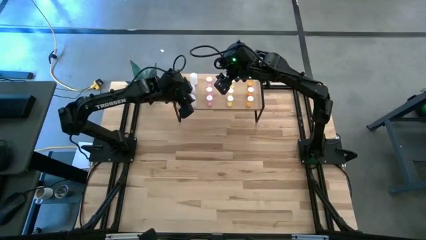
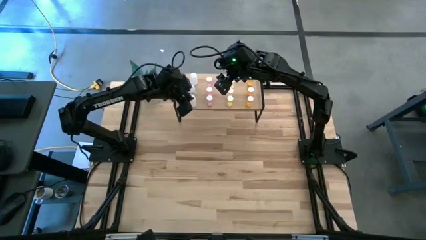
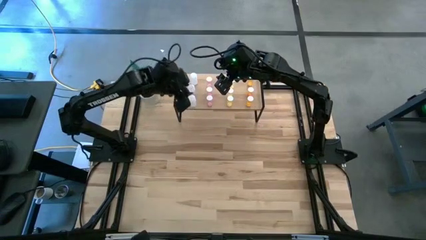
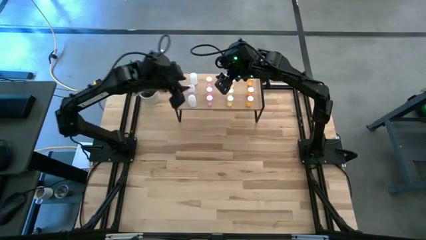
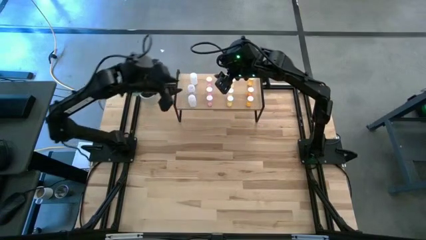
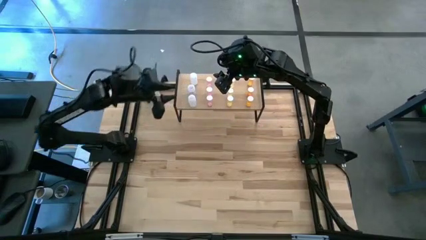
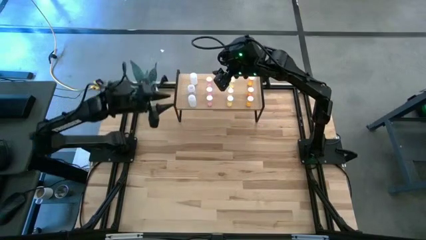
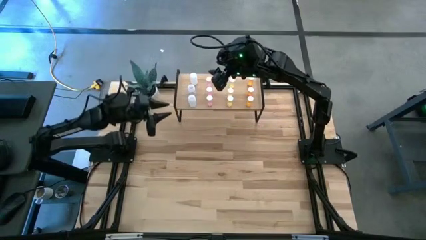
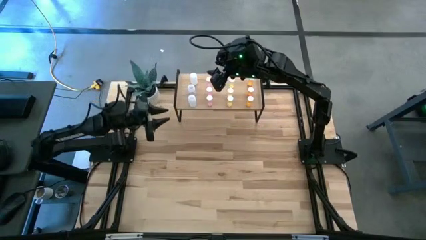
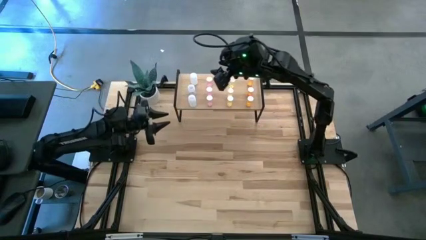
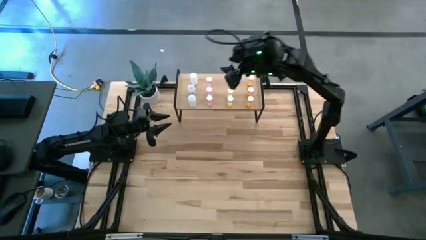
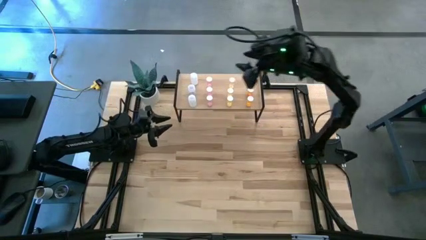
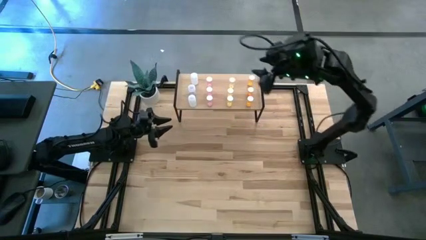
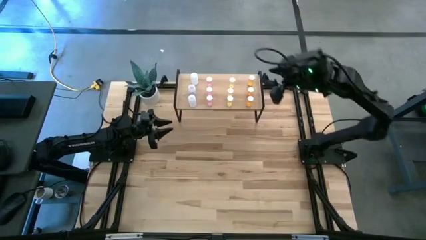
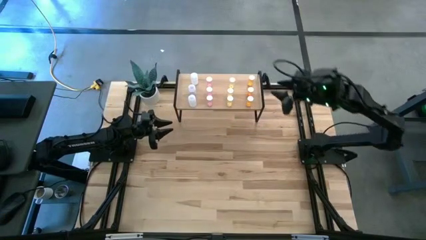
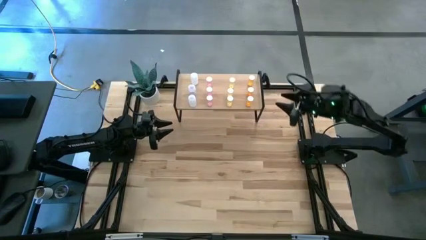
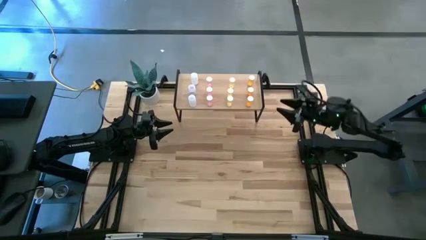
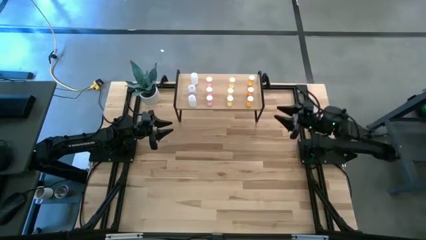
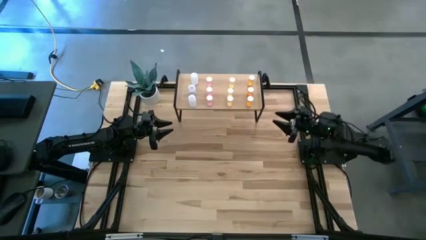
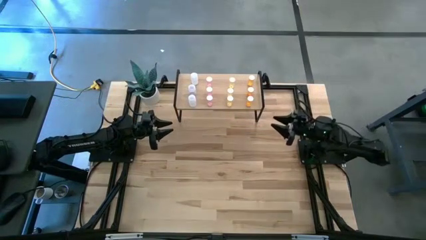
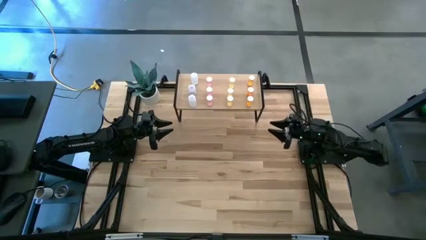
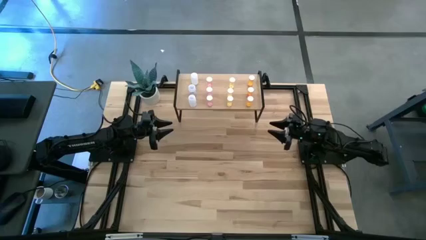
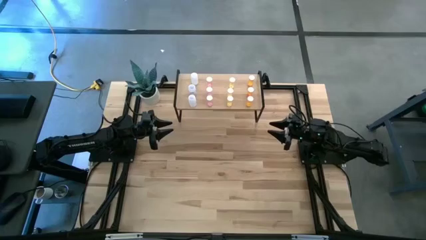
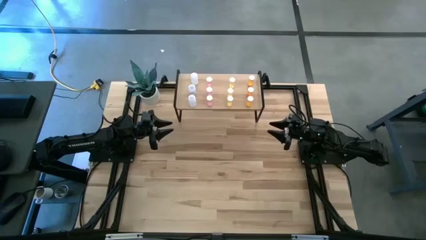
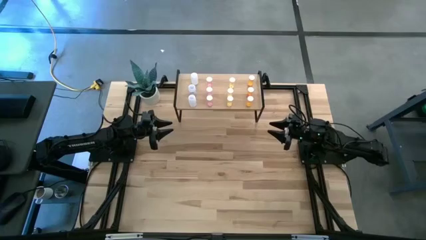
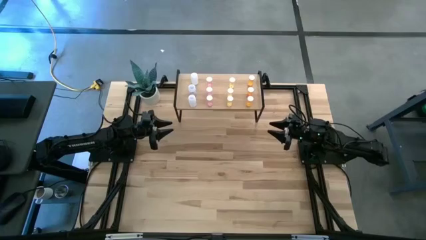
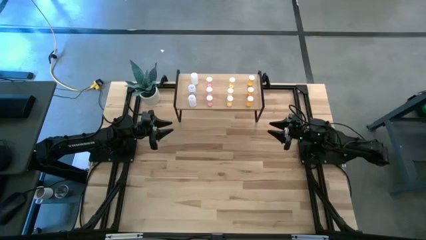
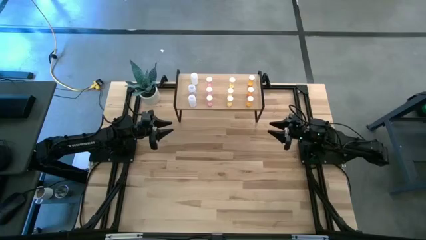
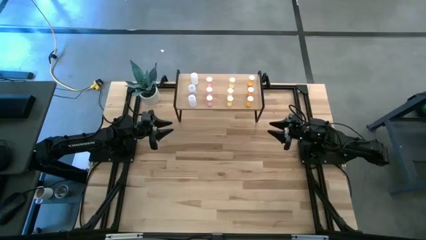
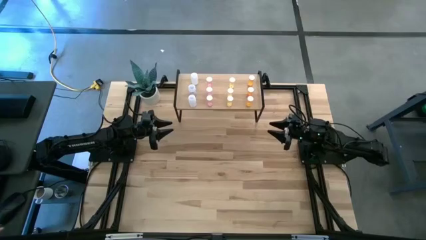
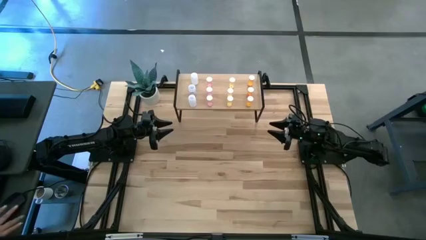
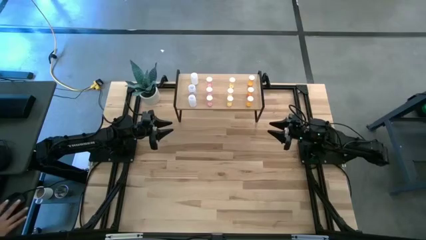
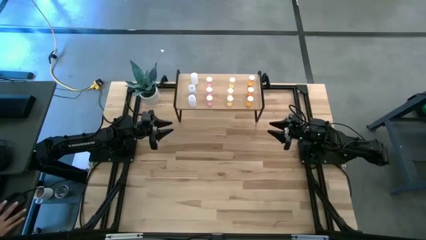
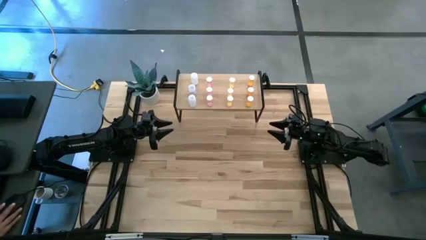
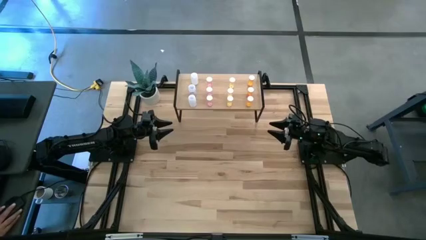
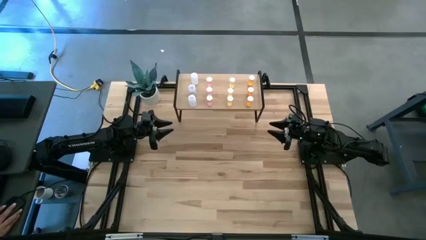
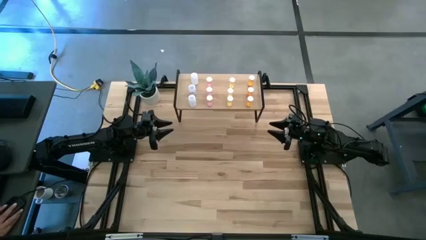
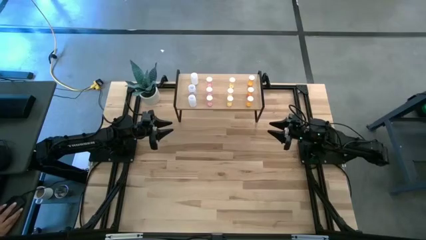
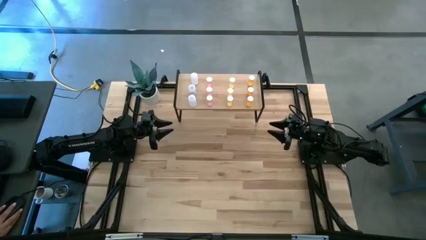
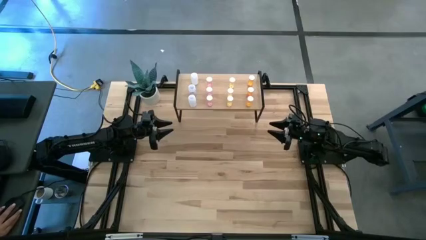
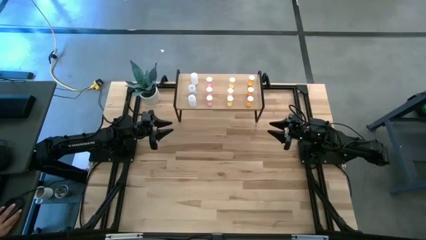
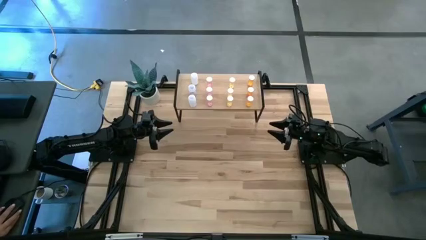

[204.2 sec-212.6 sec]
Task: Pick and place medicine bottles onto shelf by color
Return to Home Position

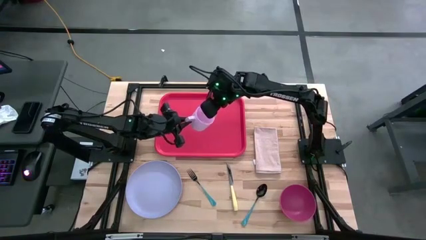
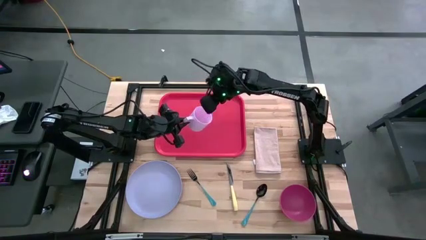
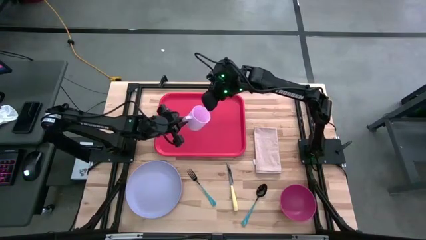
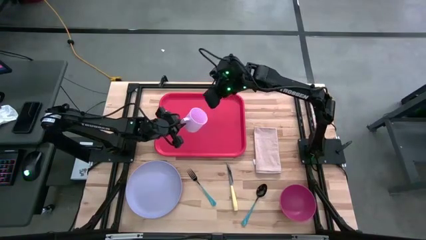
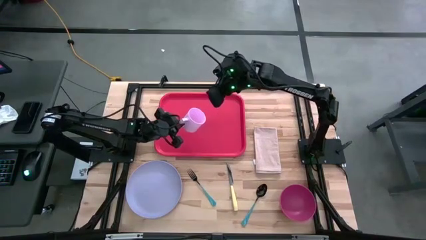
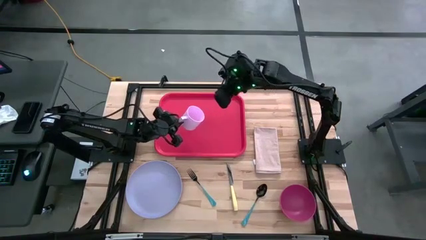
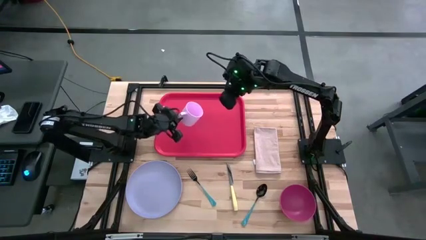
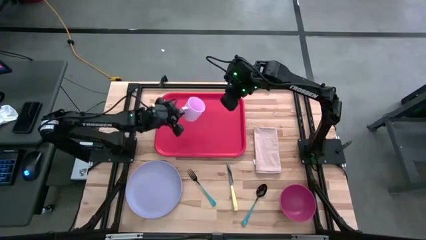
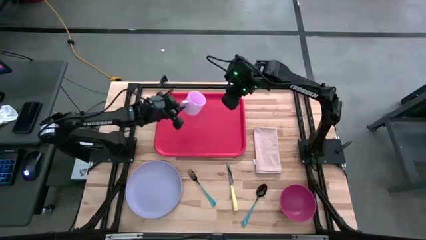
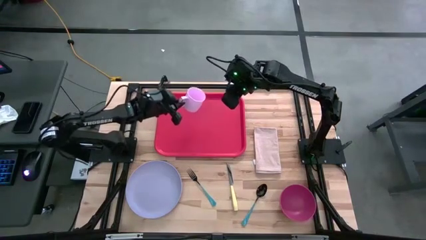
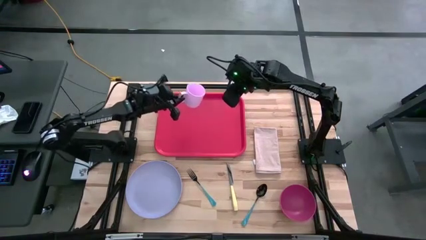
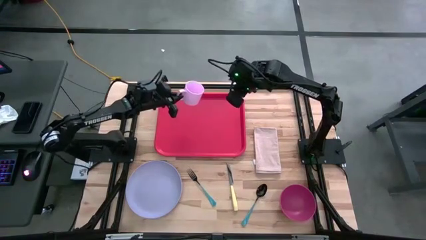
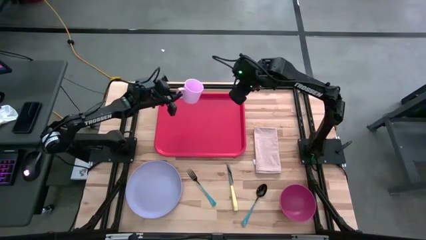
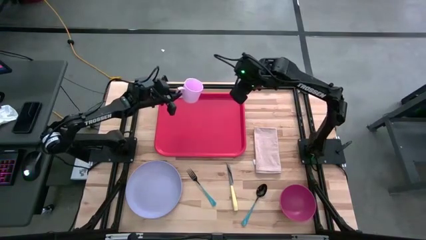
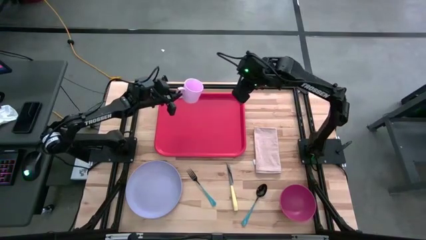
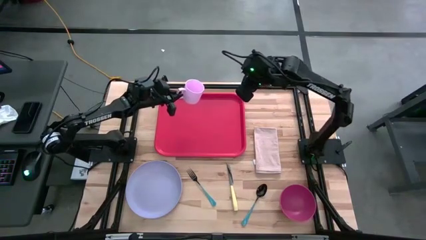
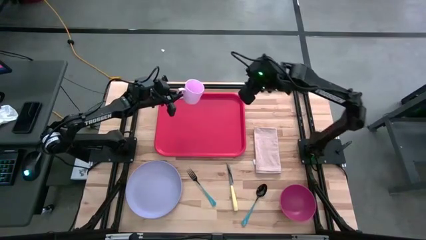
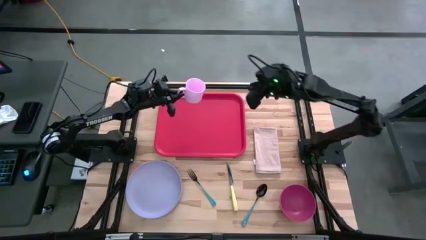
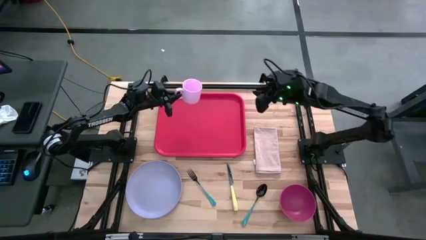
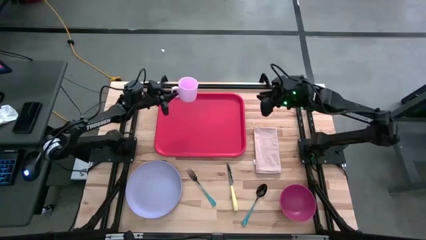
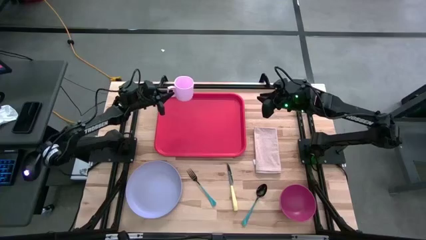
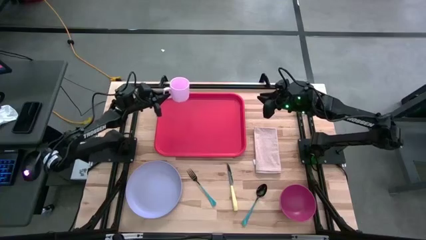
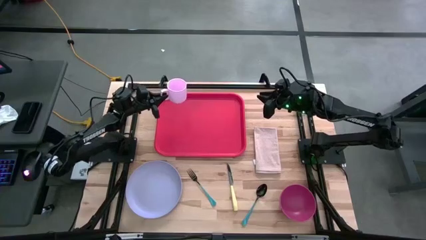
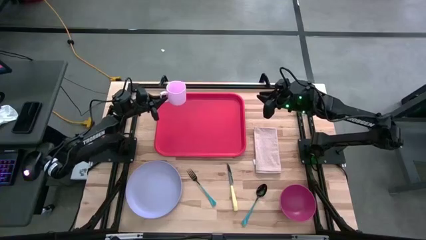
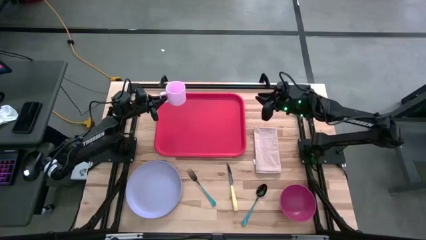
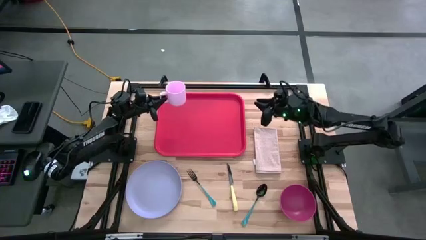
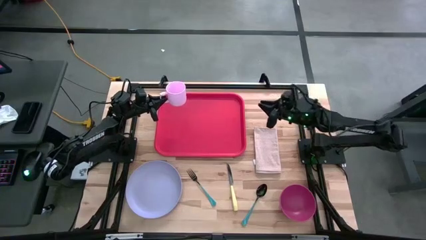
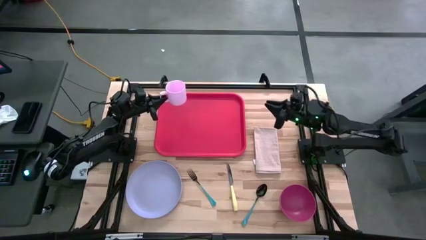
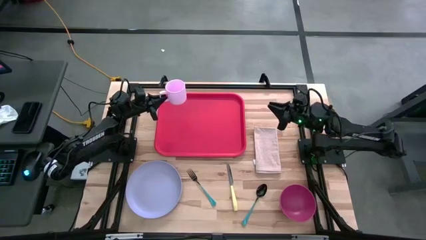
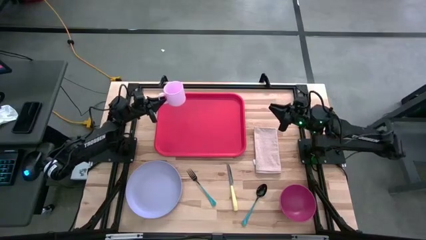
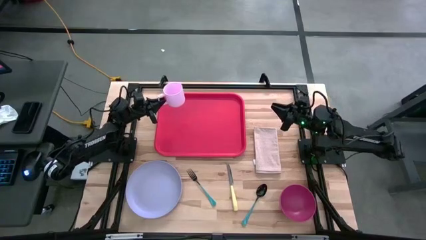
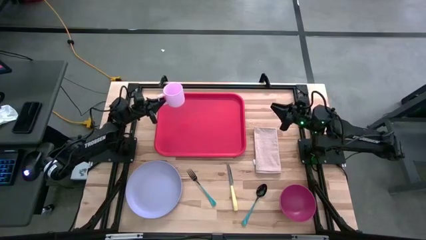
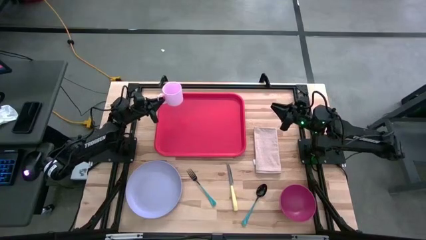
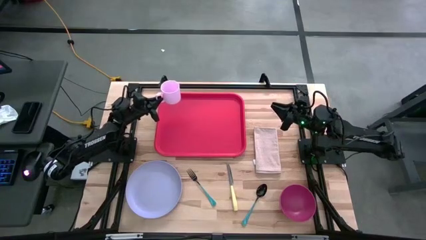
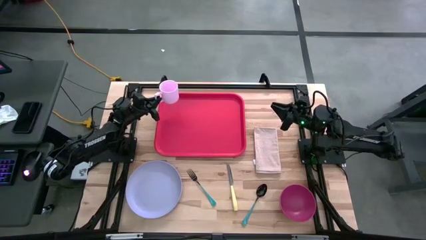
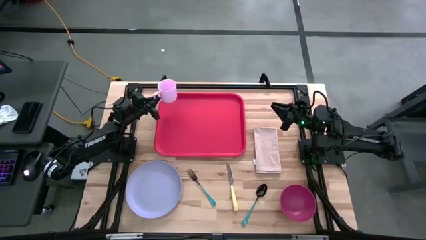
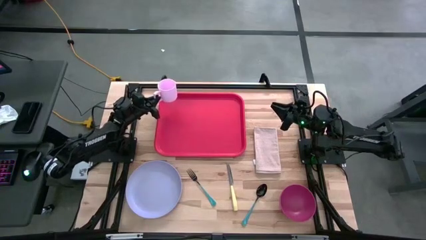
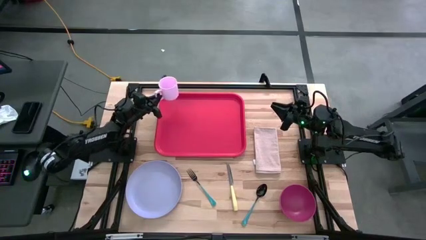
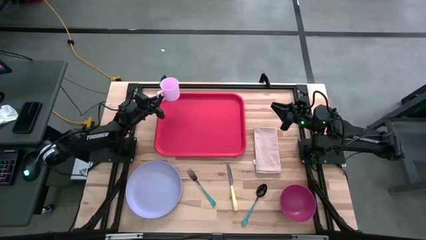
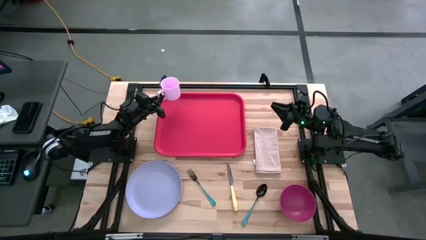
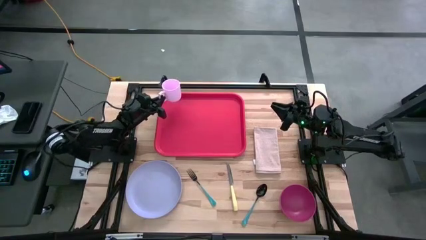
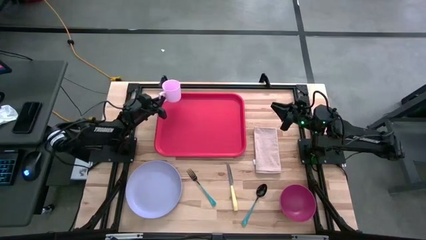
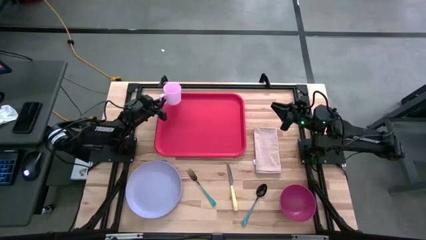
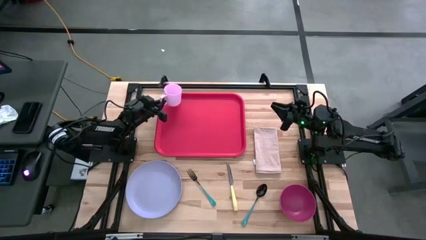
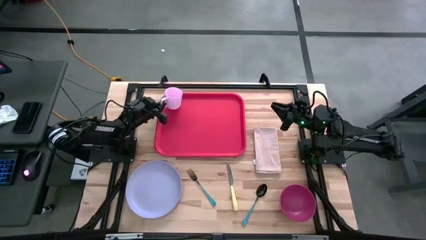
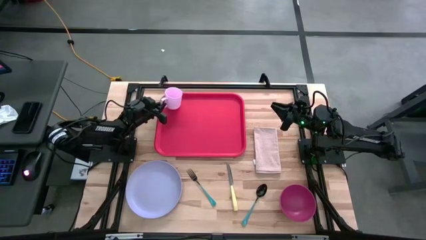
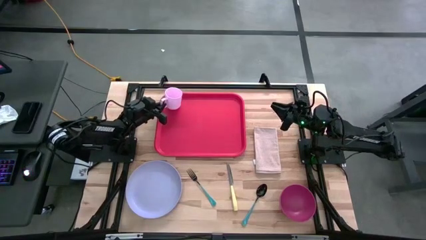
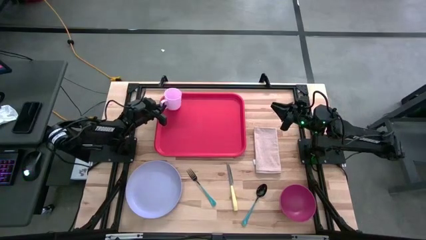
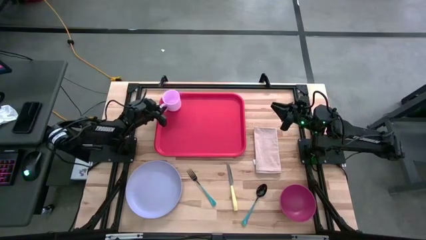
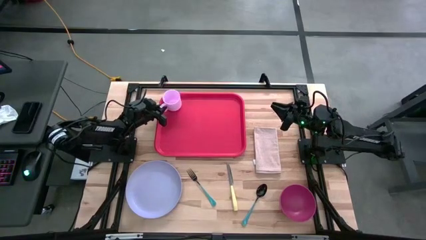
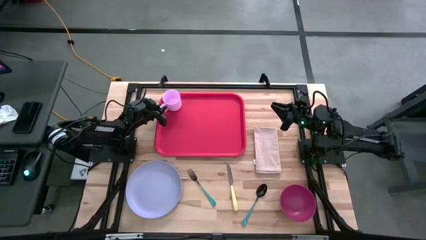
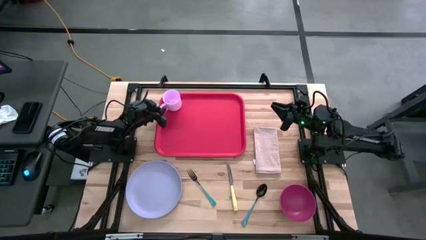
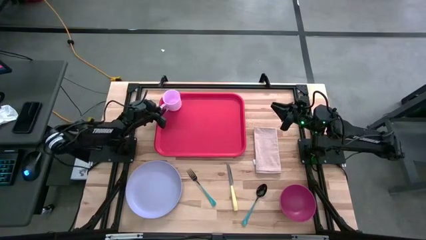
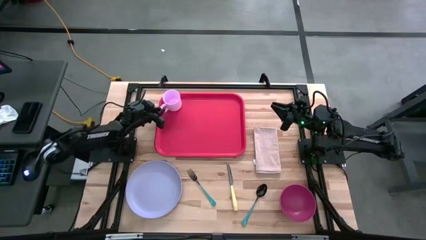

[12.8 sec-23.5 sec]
Task: Set up tray
Put the pink mug on the top left of the red serving tray
